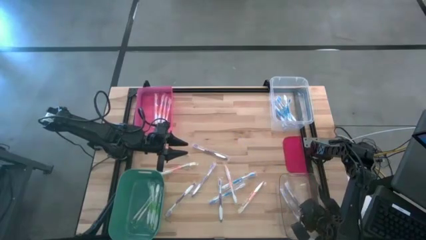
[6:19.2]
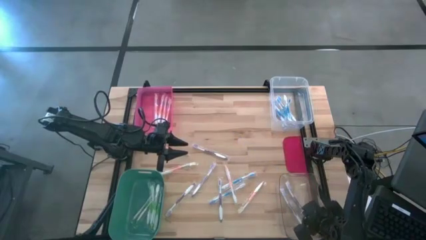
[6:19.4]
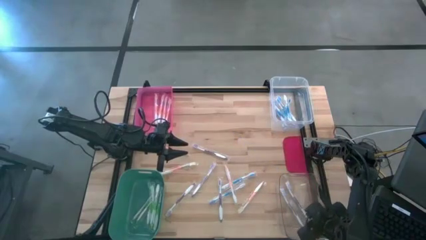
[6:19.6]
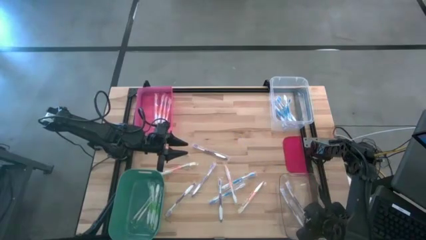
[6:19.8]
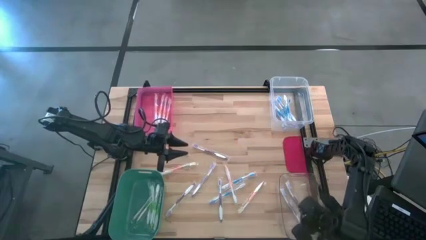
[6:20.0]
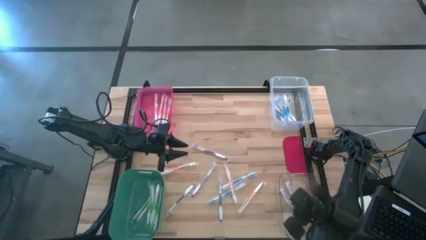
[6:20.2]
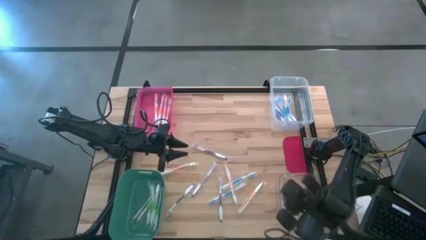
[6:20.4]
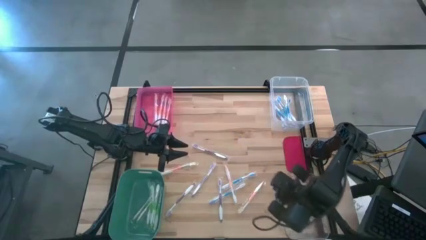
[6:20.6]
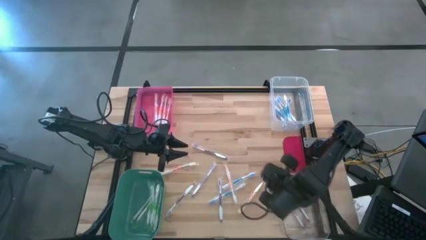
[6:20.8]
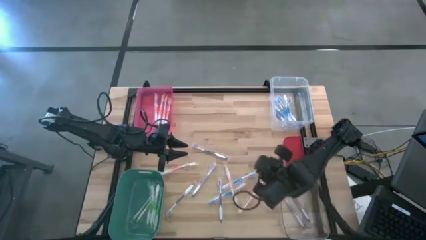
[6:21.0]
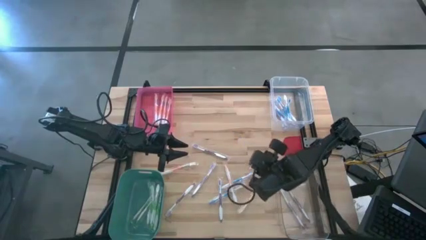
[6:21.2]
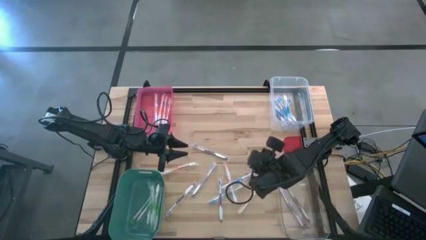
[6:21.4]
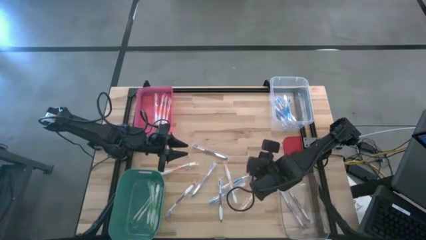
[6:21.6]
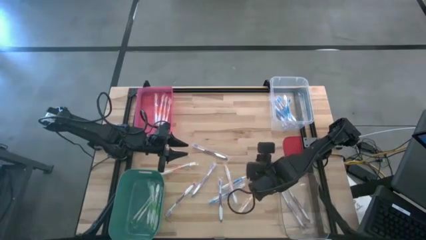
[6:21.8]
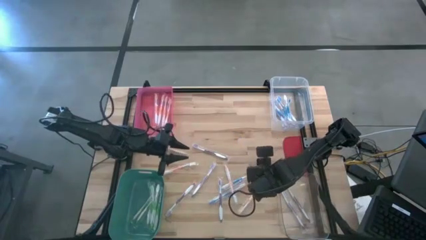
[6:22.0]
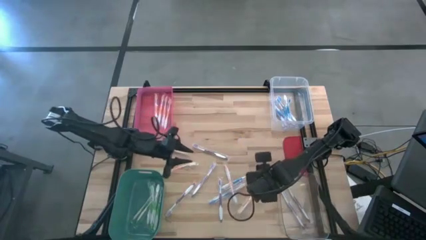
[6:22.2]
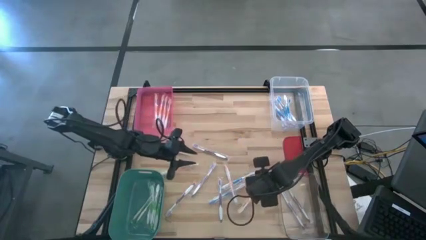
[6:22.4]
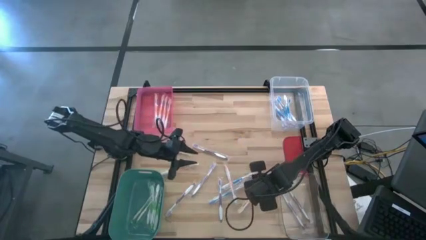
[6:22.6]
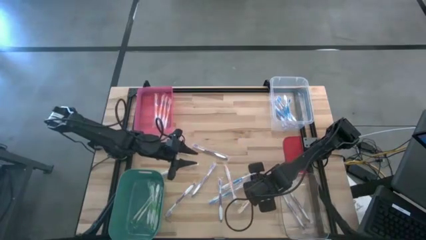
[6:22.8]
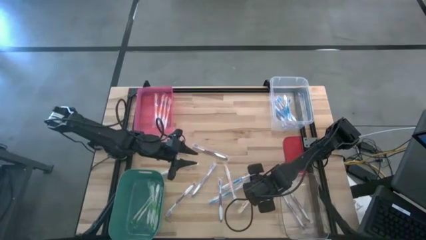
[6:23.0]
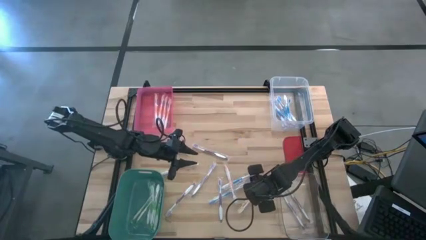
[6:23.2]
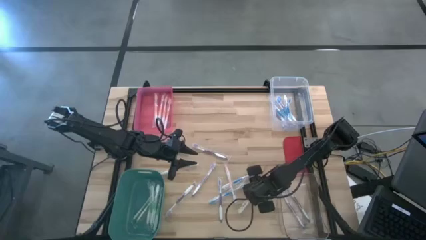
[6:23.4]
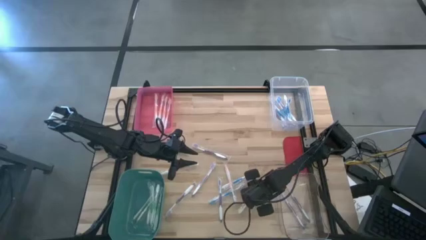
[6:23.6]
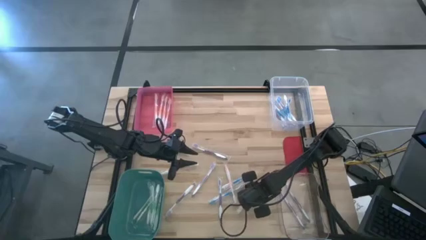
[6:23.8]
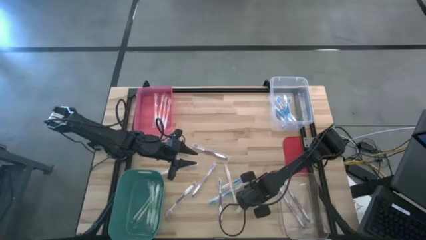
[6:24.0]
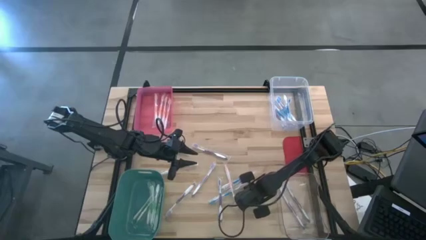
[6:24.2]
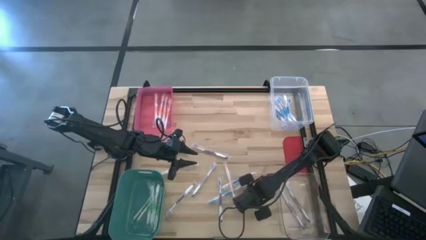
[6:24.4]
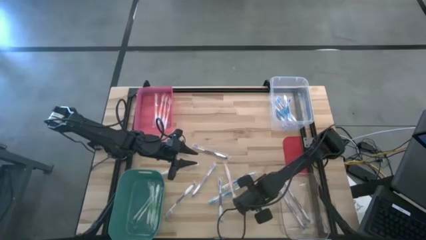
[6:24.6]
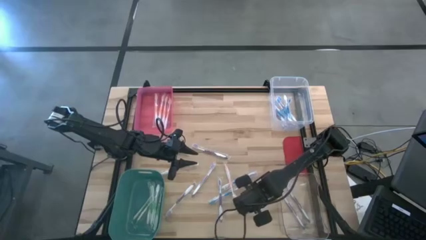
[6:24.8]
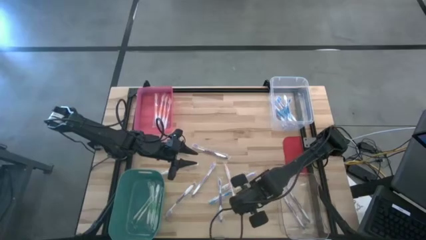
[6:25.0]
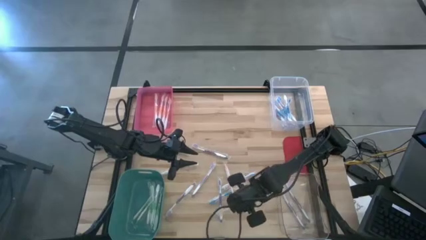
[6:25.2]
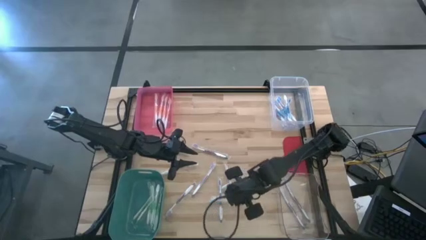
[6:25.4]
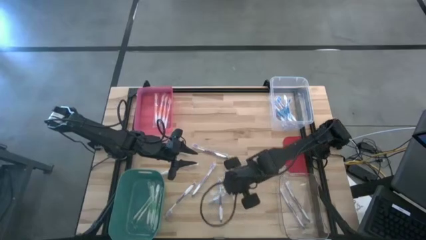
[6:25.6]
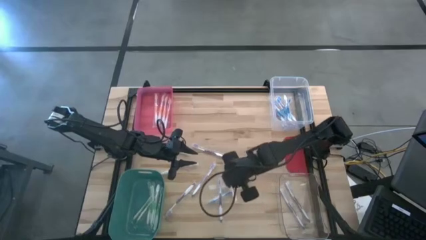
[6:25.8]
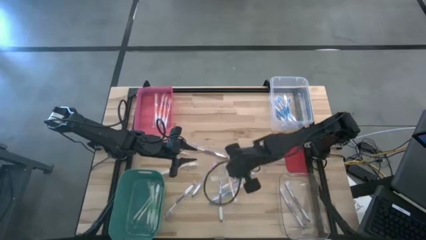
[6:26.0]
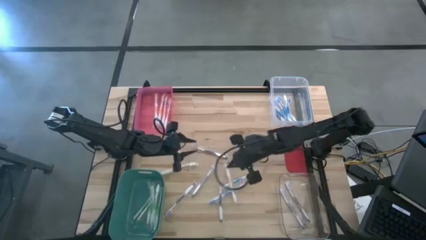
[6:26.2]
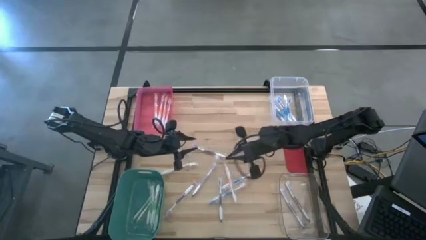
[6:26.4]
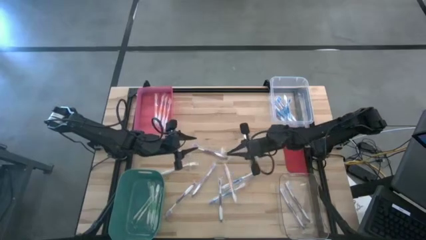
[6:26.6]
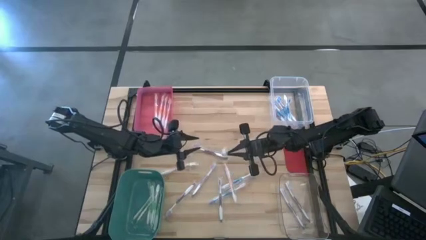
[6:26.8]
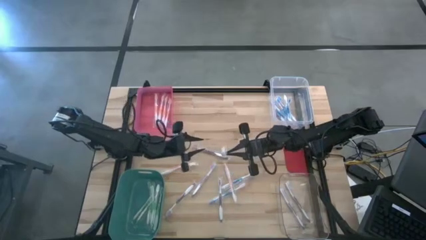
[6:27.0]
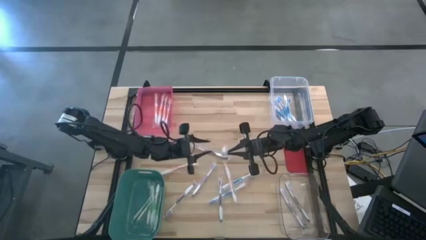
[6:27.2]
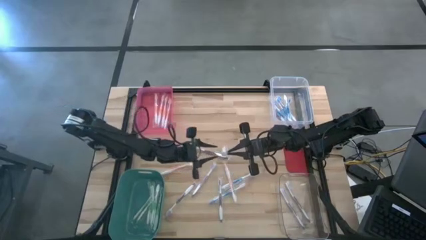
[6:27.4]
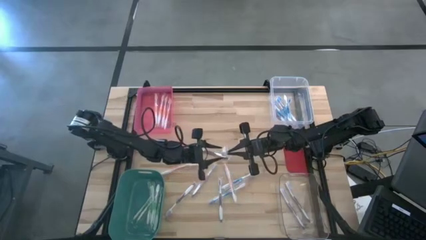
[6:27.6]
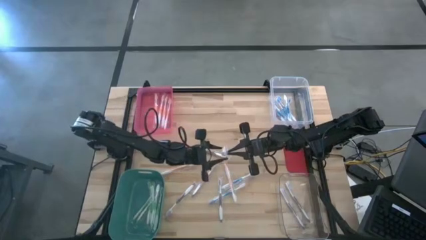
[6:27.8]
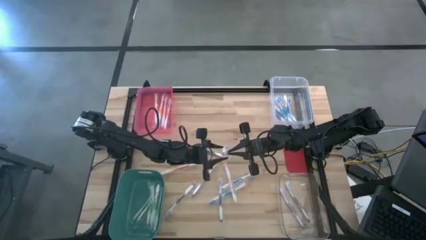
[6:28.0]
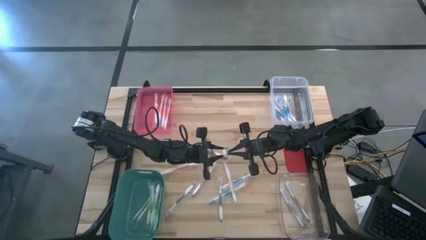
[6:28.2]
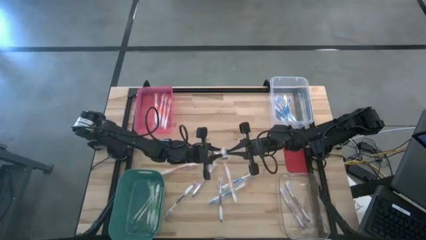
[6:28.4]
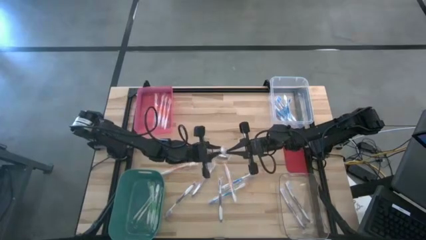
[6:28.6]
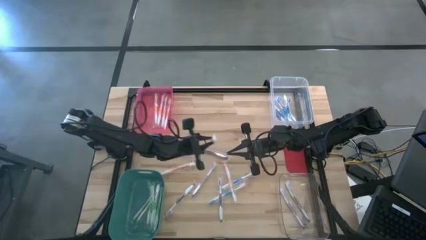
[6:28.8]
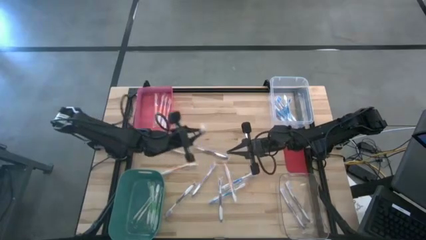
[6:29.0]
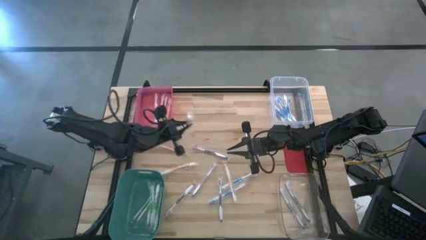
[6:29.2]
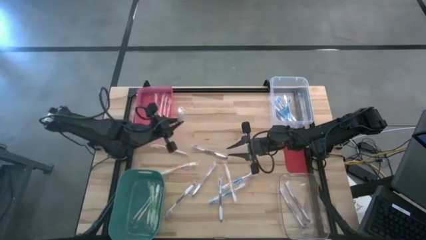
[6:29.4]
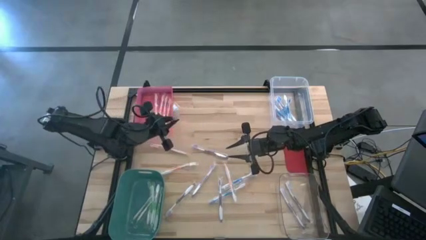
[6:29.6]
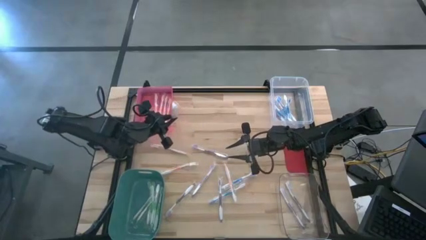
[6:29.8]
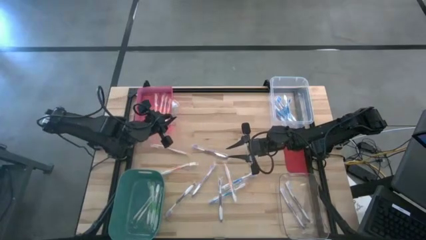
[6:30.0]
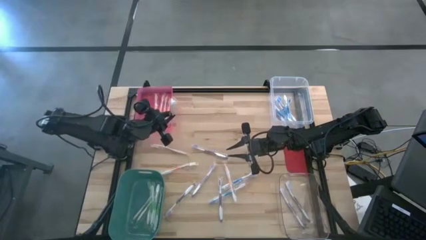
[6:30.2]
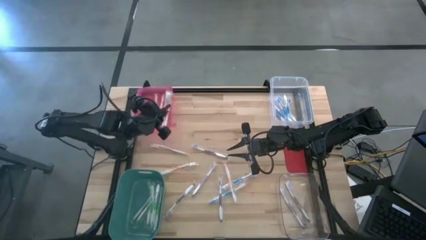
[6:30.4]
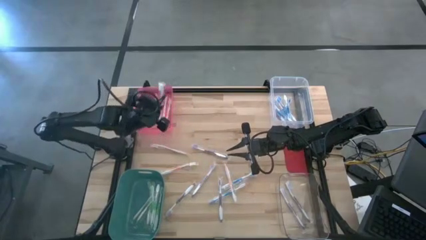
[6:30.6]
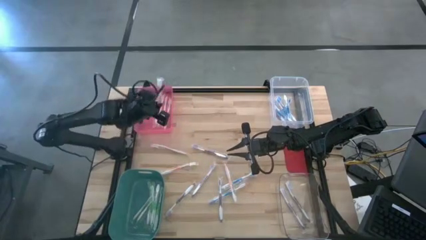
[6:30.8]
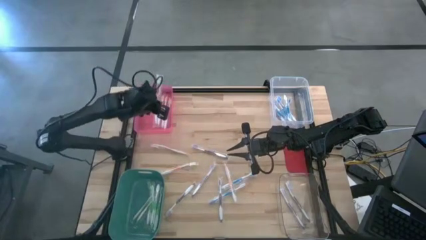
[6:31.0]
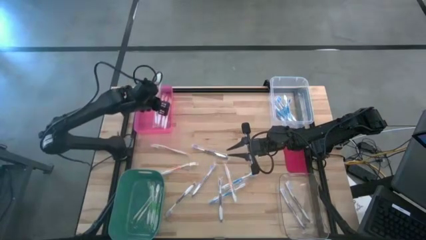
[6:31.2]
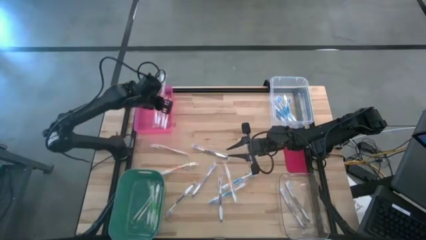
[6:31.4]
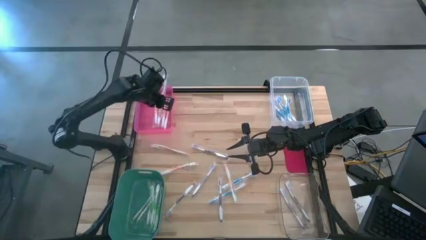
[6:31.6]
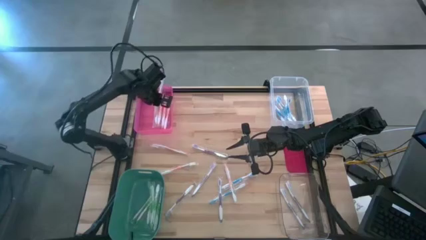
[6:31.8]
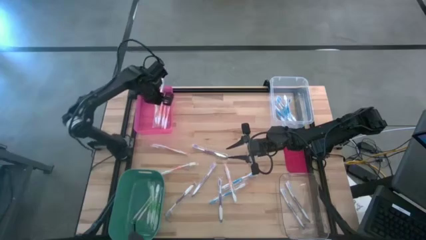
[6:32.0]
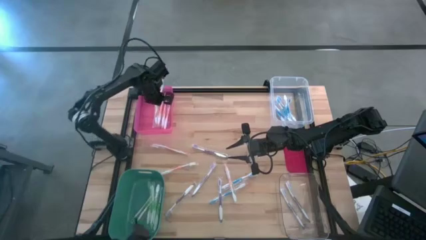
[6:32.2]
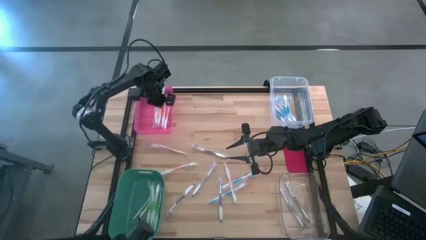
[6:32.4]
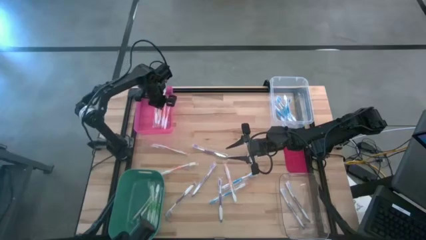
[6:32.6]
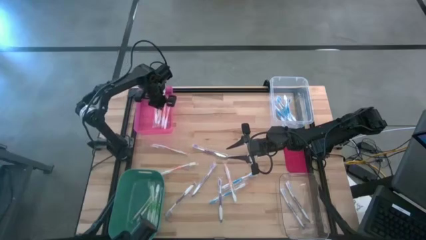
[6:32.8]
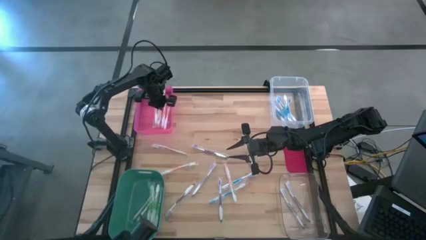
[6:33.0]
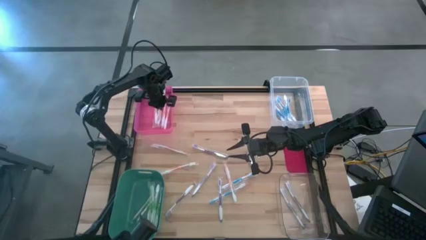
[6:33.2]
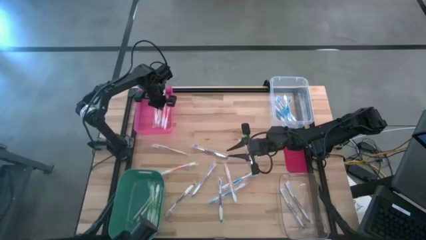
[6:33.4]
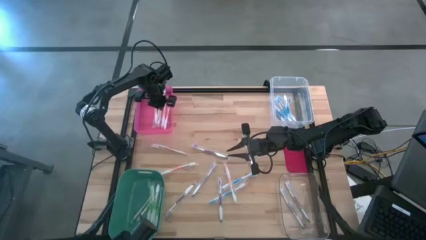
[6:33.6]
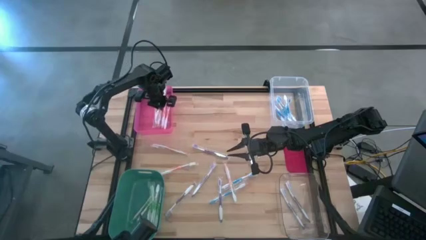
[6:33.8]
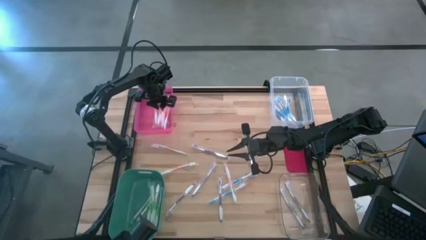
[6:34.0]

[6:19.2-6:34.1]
Task: Pick & Place Toothbrushes
Put the orange toothbrush into the pink bin

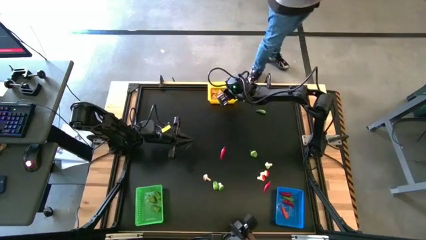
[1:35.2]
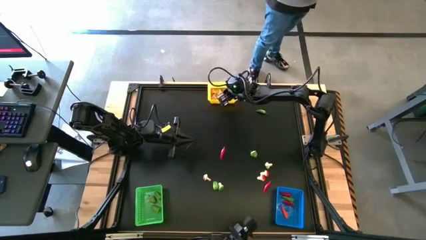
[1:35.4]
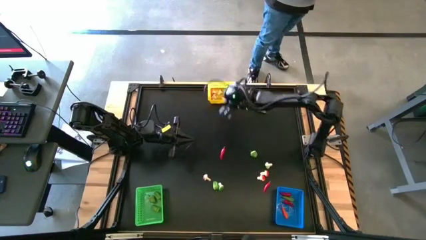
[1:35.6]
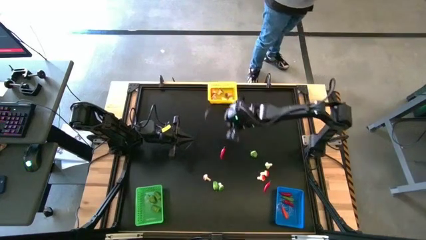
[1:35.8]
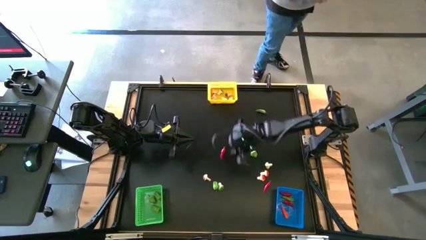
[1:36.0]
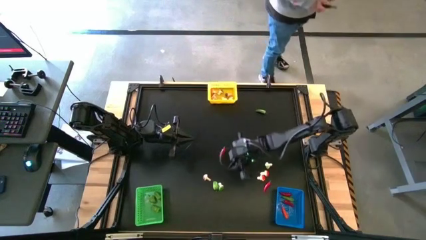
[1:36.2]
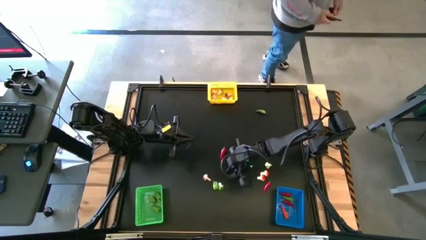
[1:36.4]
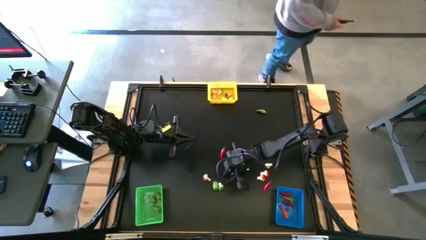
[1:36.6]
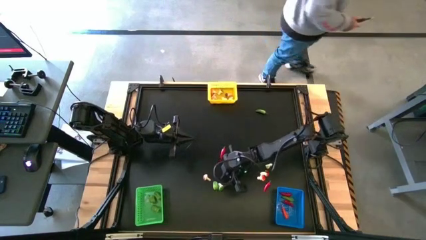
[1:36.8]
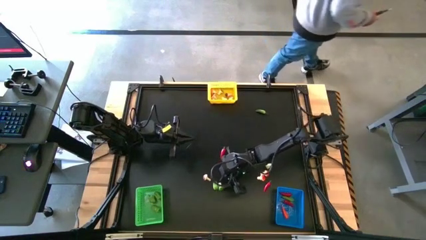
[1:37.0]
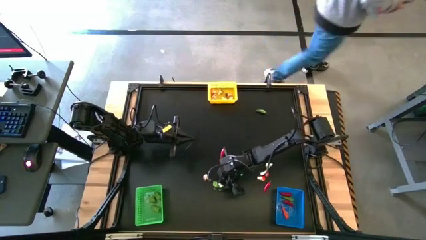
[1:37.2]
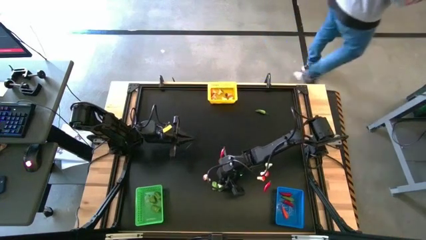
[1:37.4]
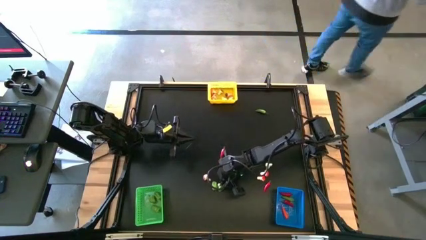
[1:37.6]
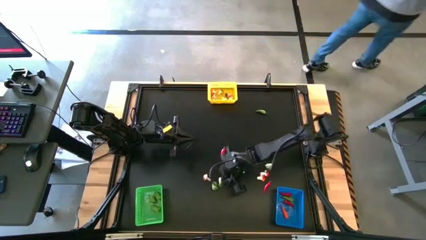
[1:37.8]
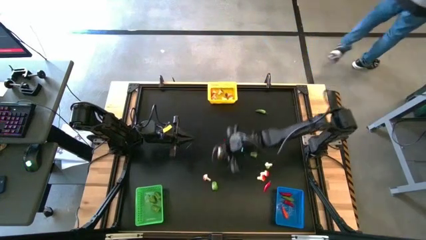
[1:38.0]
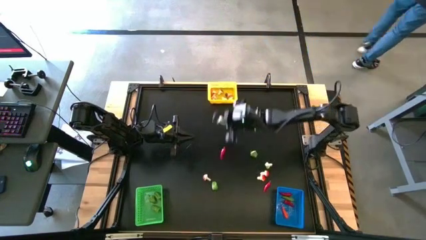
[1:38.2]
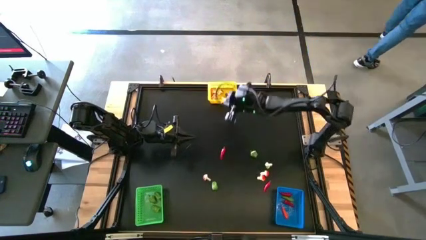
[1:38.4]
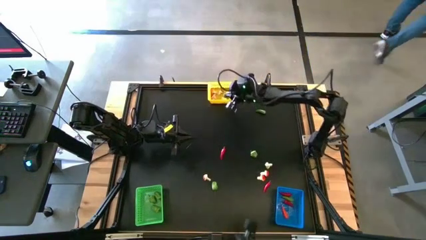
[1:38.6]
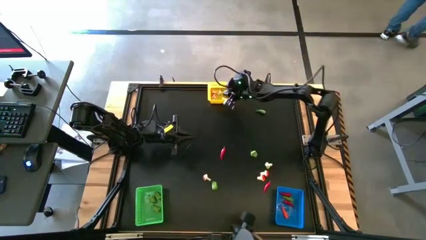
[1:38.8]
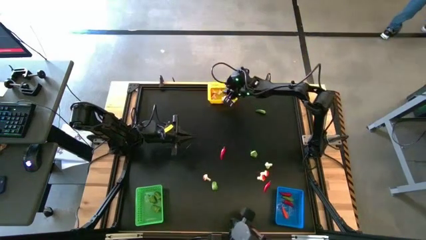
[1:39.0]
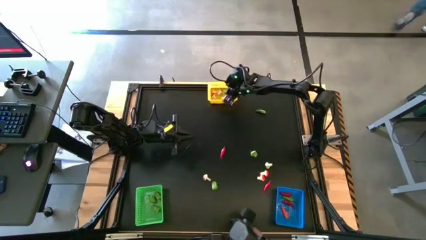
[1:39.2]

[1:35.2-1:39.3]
Task: Sort produce into baskets
Put the left green mushroom into the yellow bin
